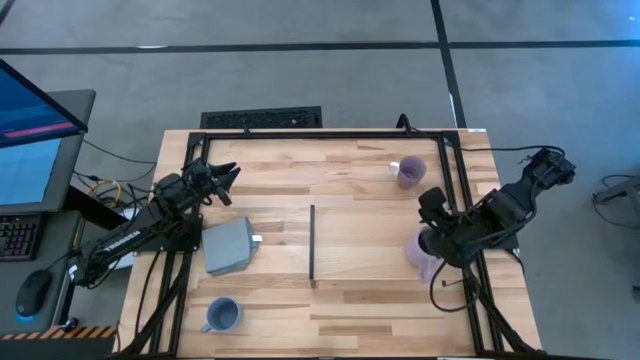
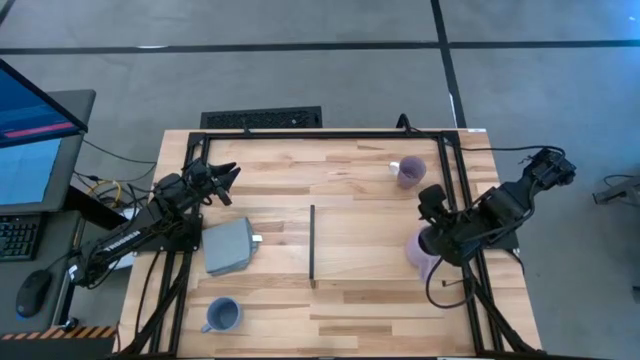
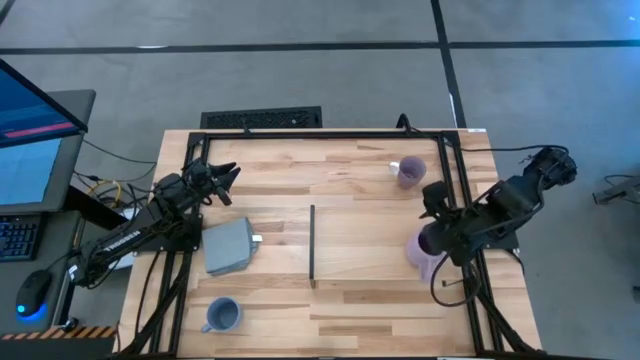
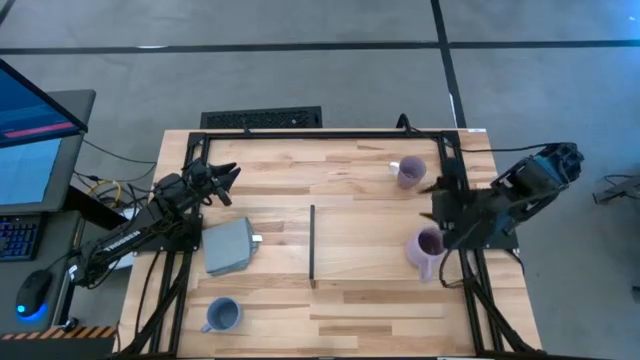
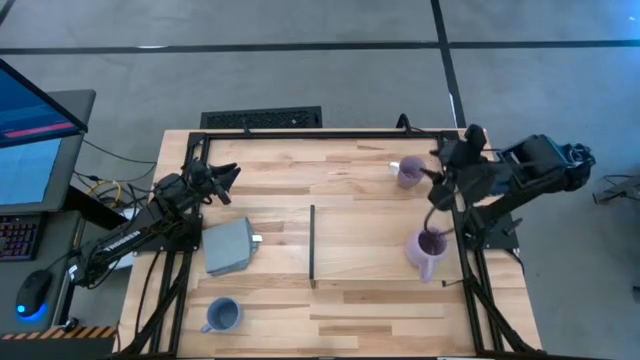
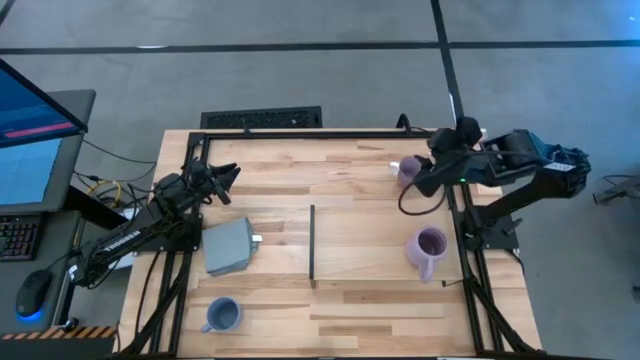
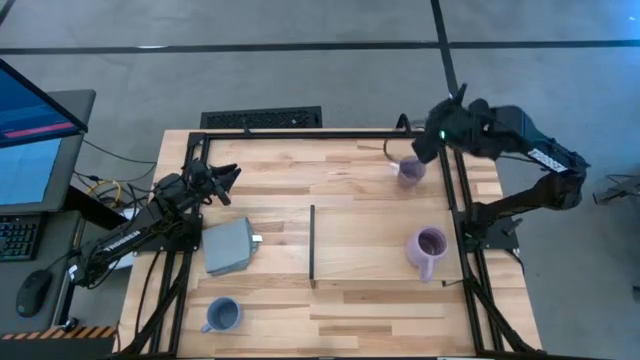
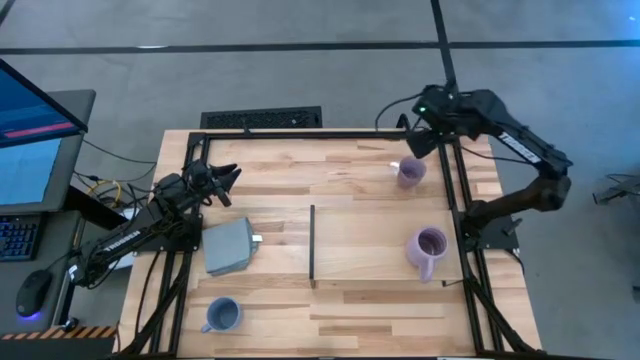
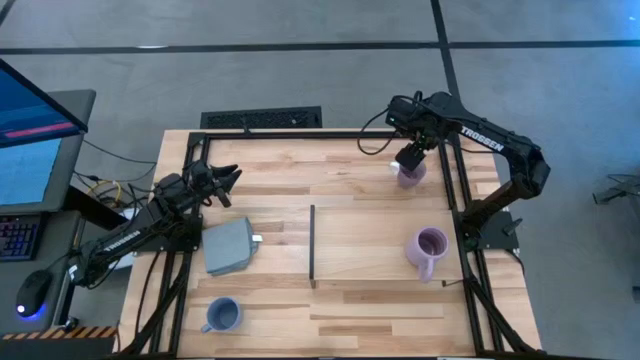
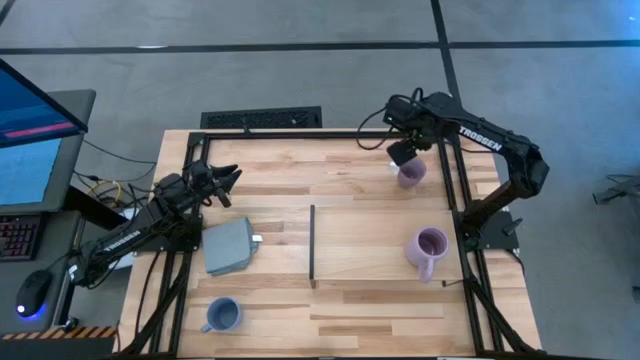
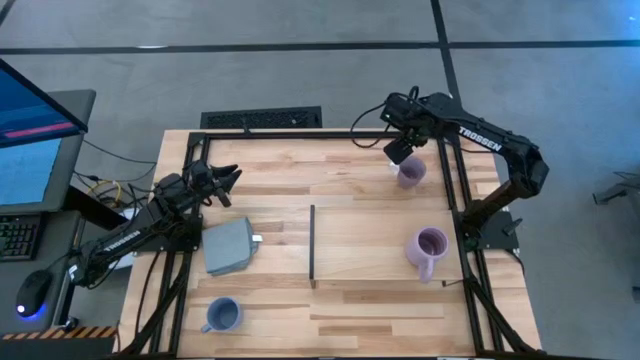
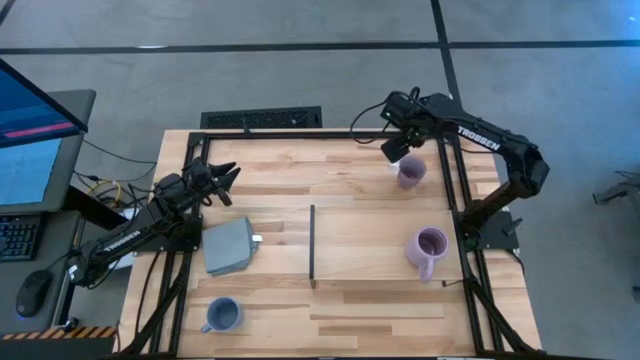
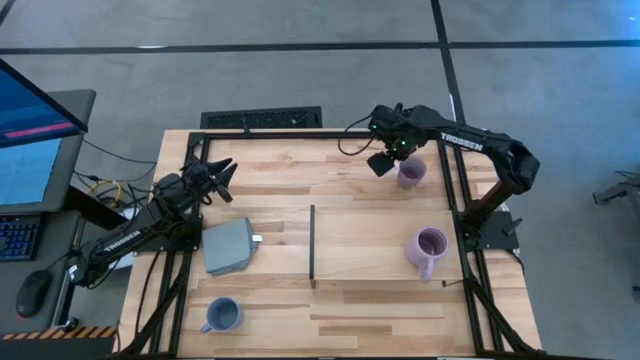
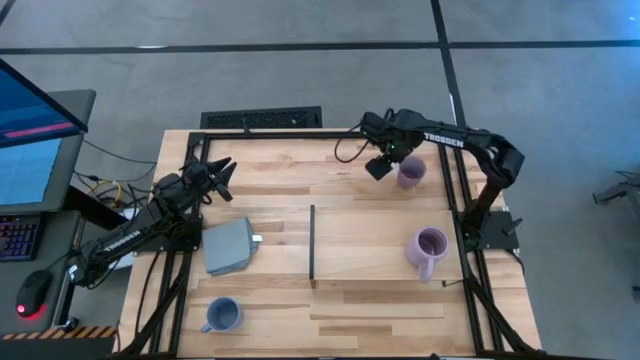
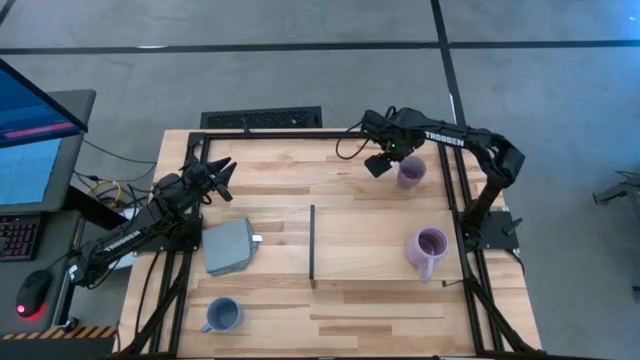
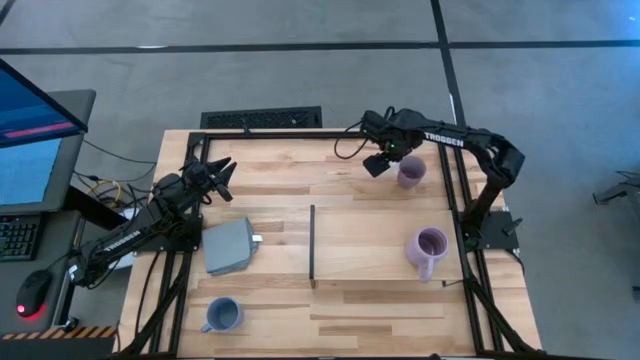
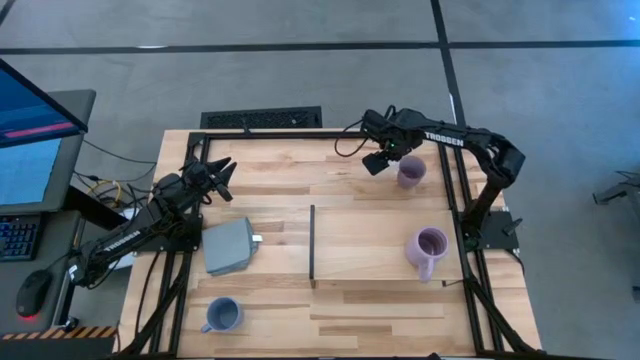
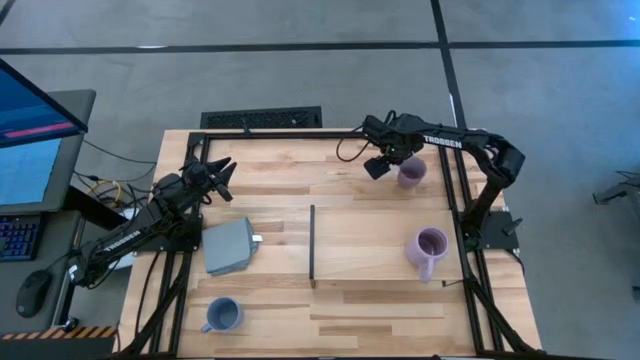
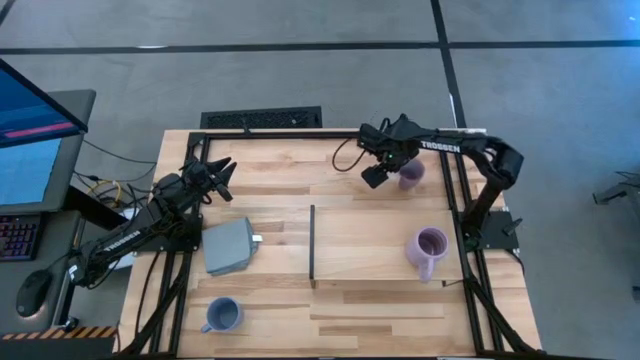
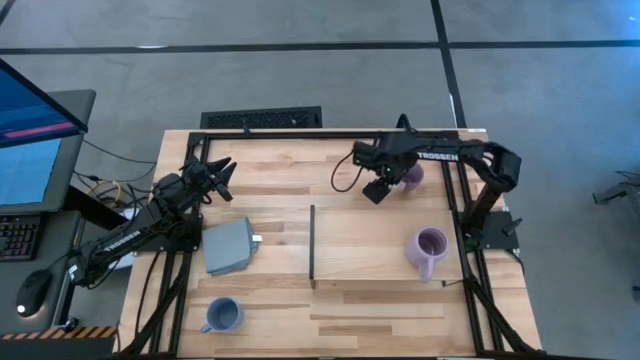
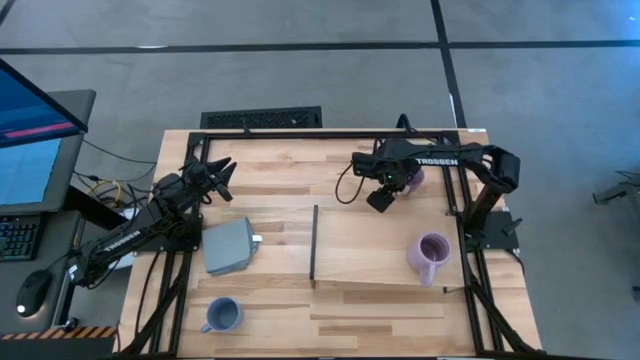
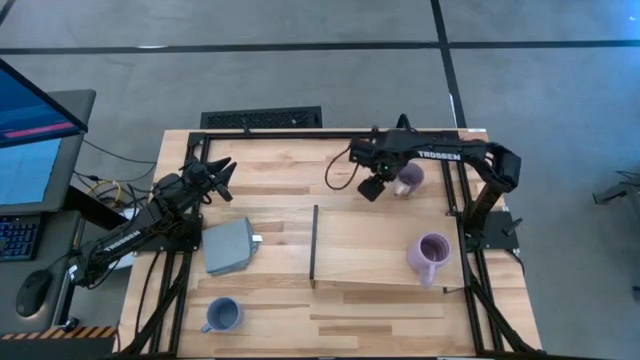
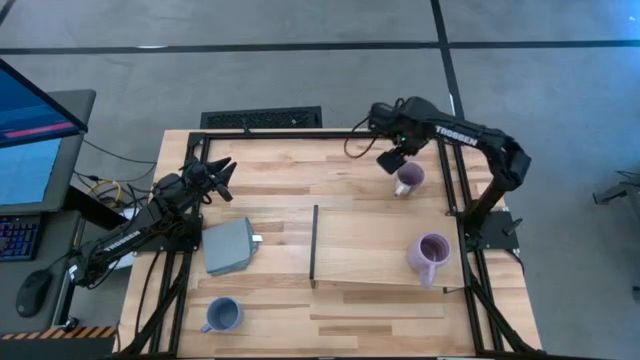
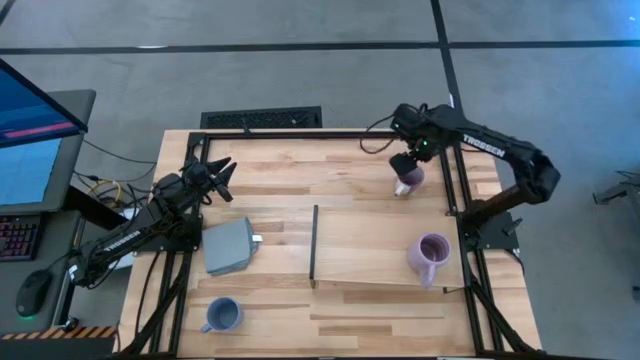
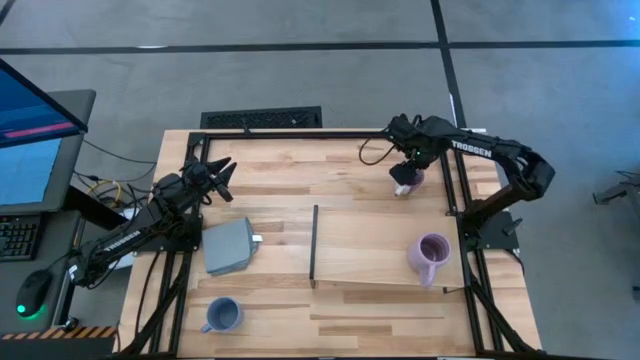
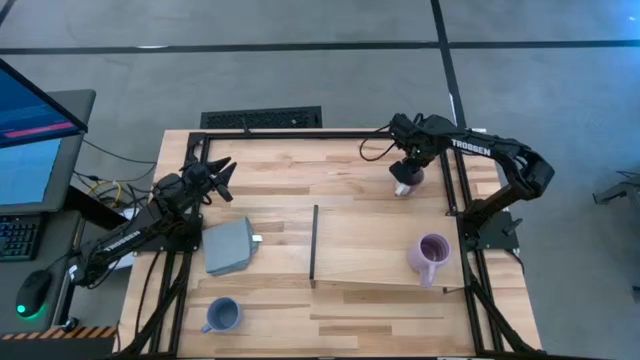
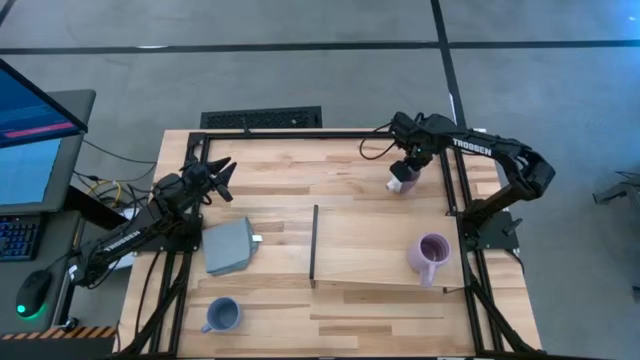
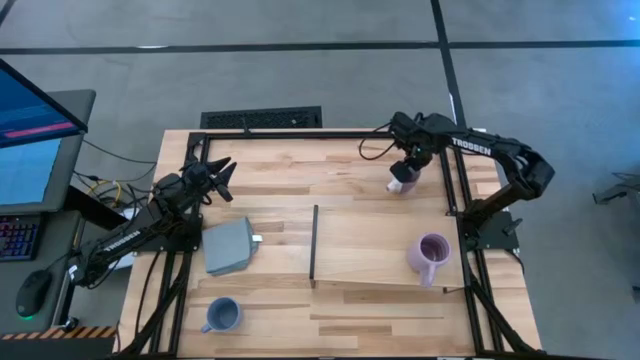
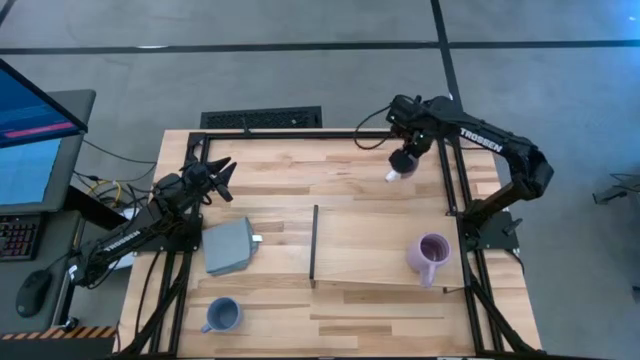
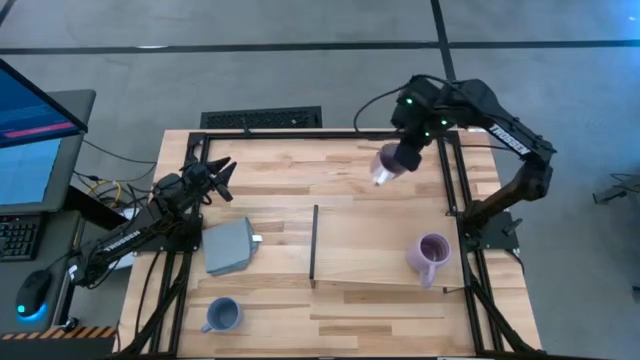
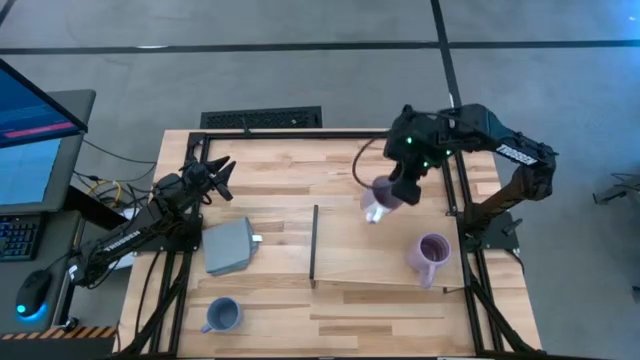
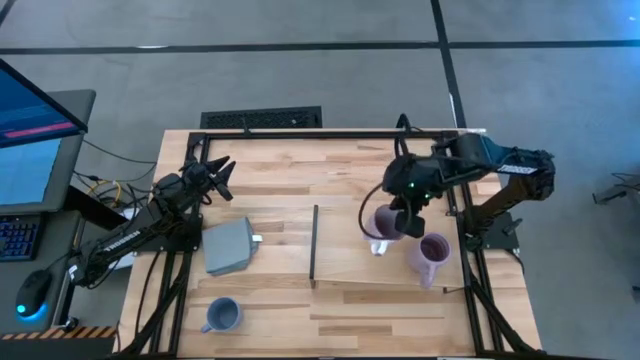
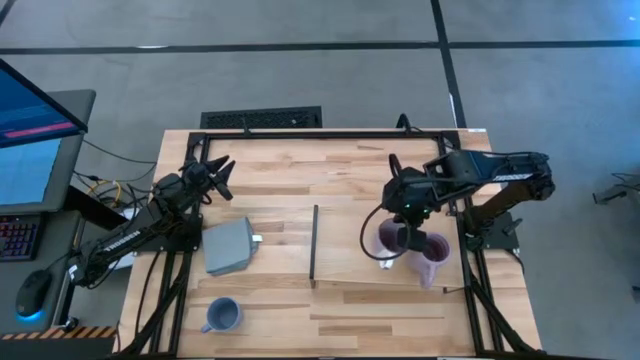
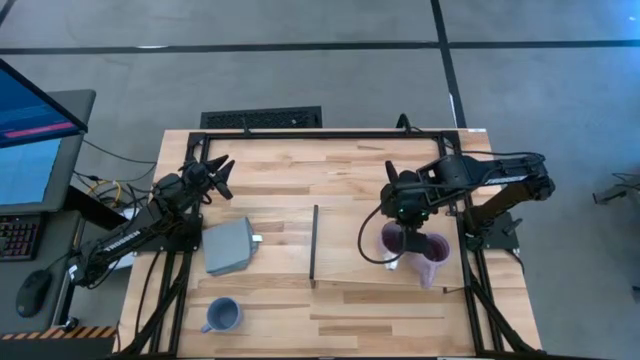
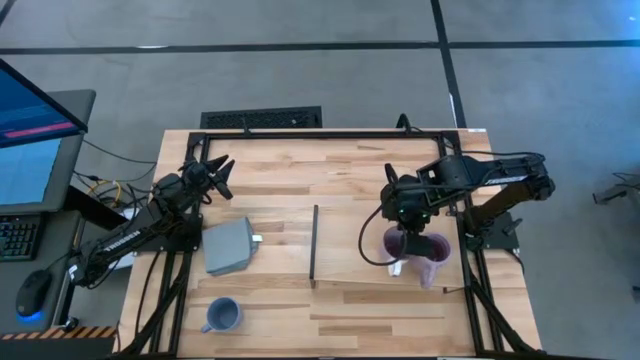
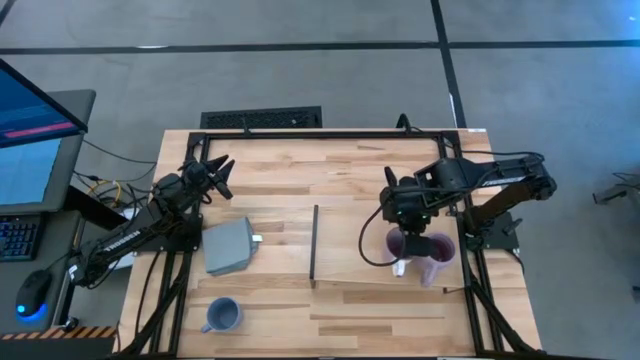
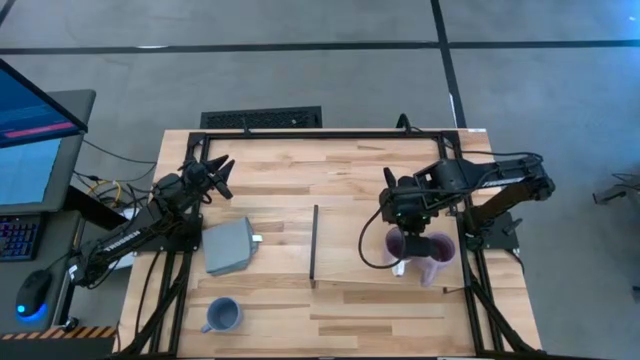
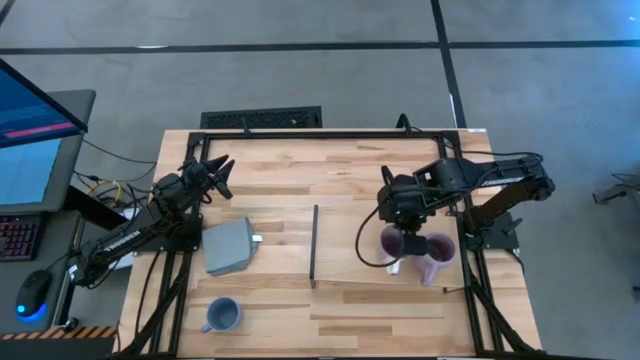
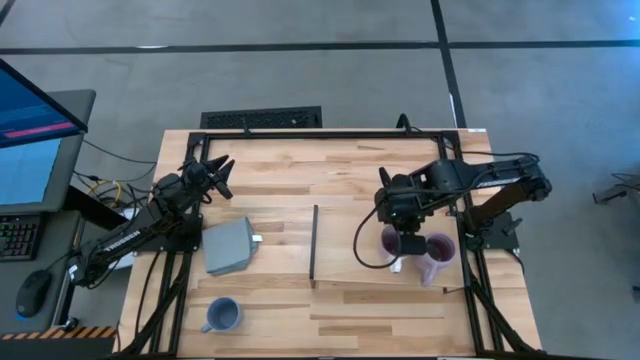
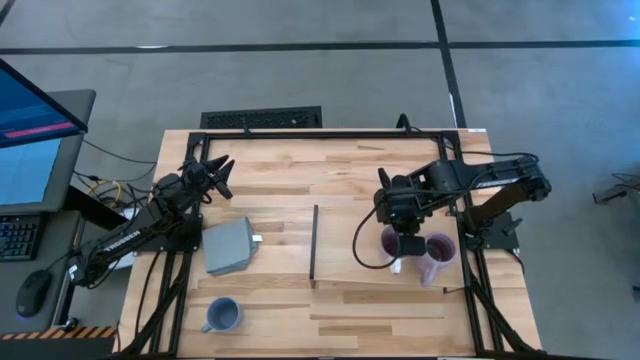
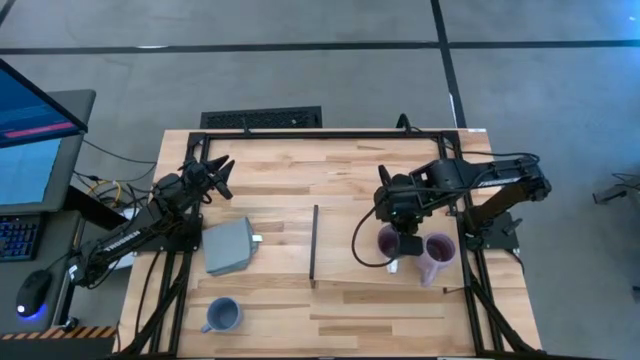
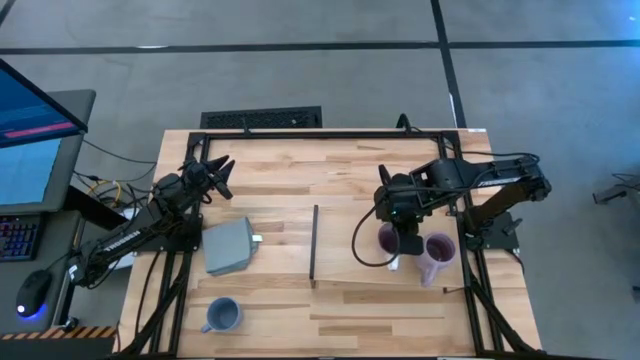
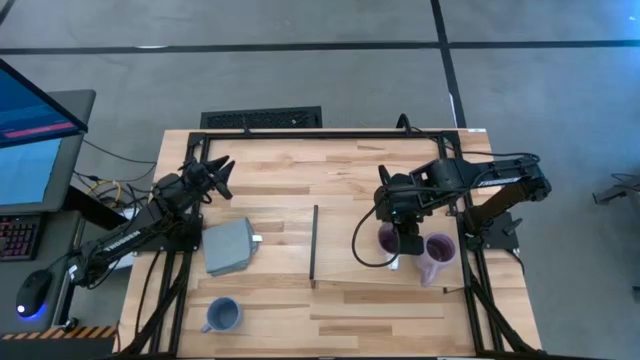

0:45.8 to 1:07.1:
Task: Stack small to large cups/mugs on shelf
Put the purple mug on the shelf
